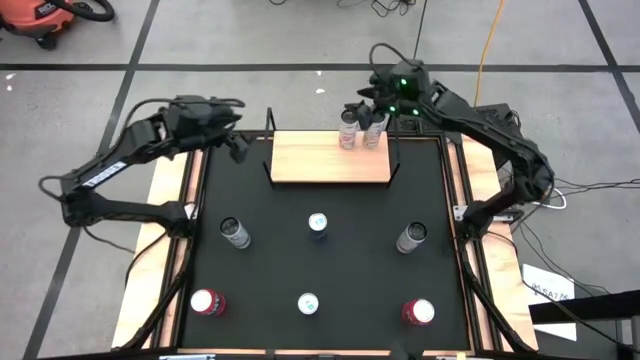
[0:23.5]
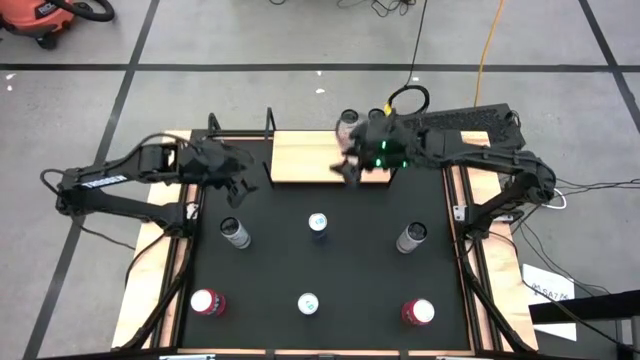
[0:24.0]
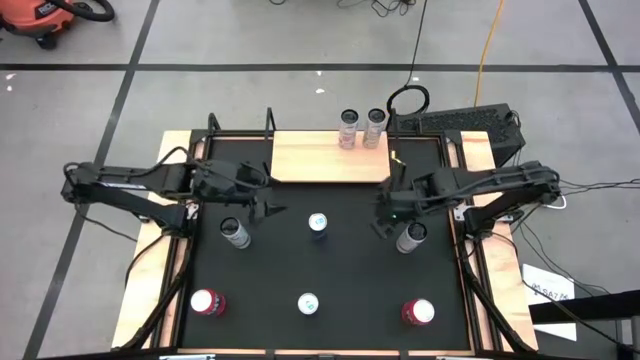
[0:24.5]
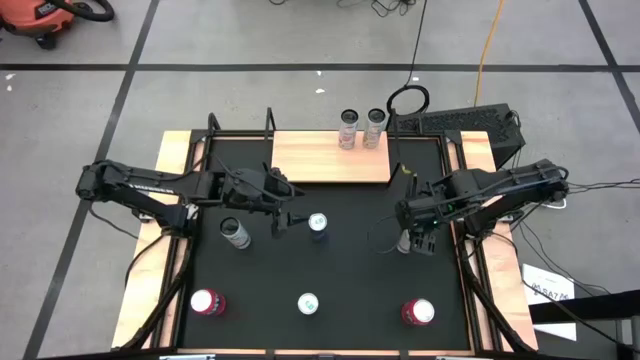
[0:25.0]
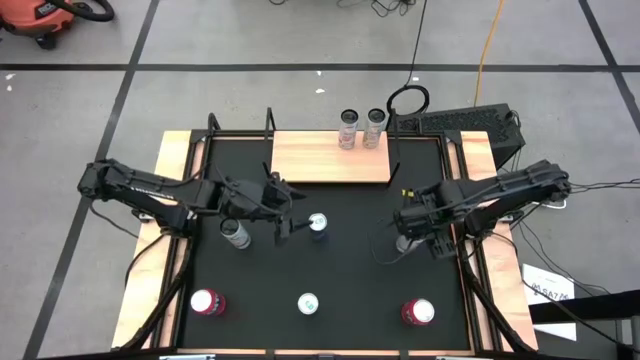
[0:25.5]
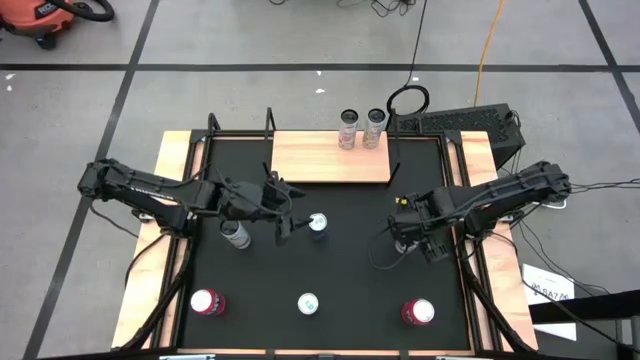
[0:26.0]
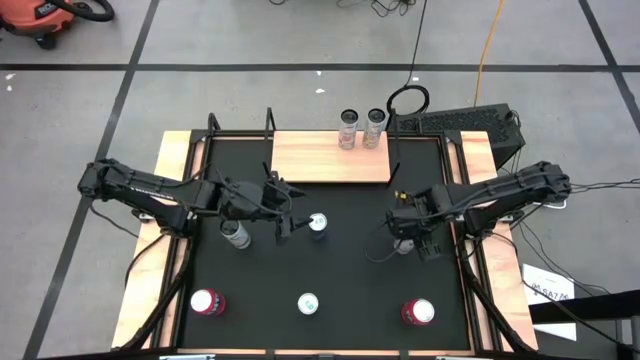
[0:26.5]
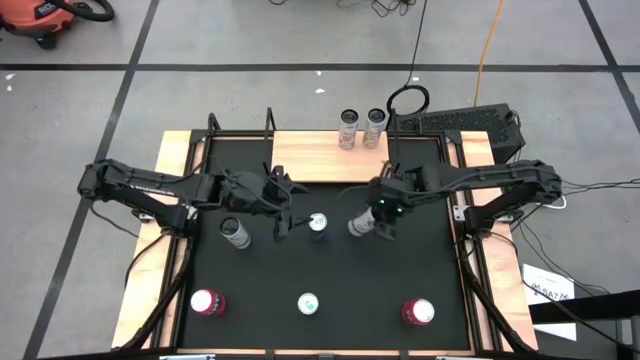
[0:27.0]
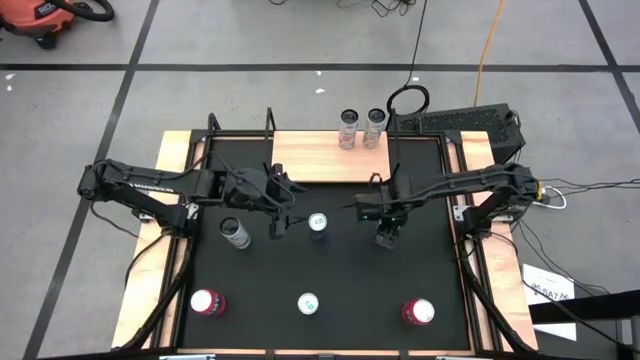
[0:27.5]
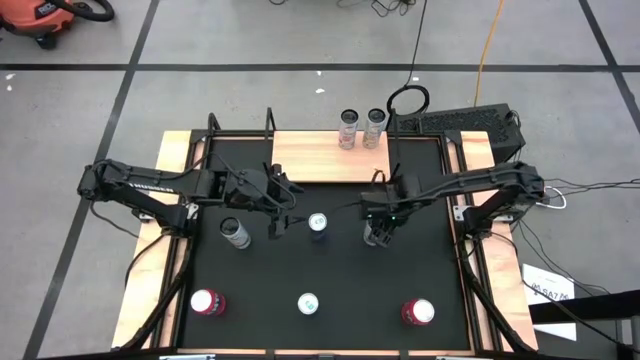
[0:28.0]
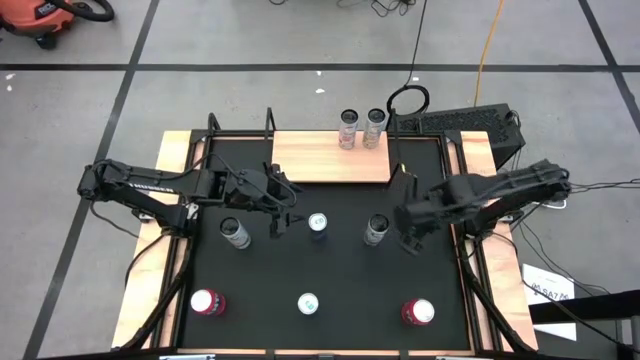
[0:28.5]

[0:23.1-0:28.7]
Task: Place canned beverage on shelf
Move the right white soda can to the center of the table

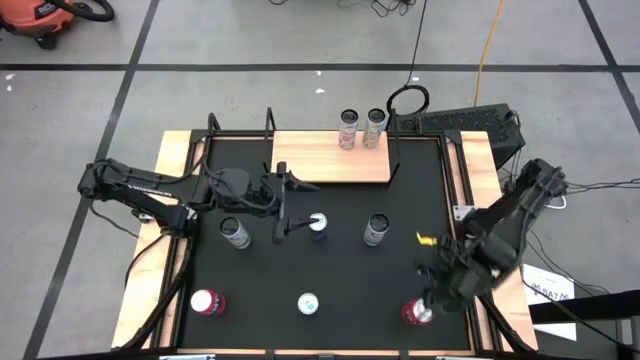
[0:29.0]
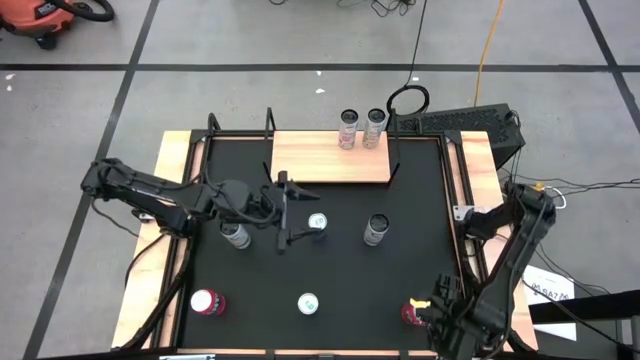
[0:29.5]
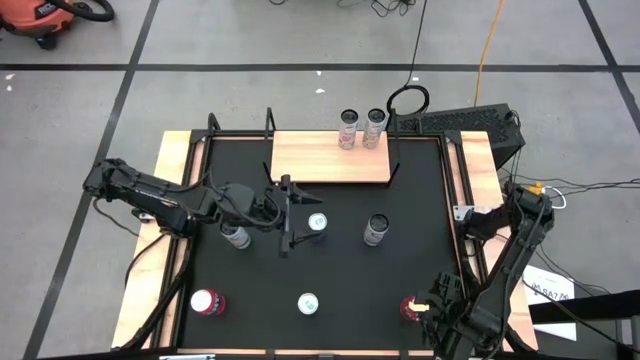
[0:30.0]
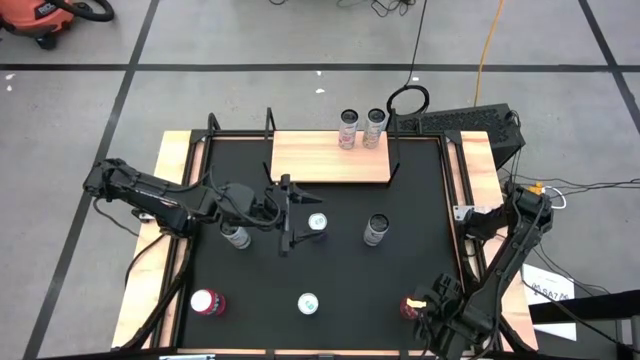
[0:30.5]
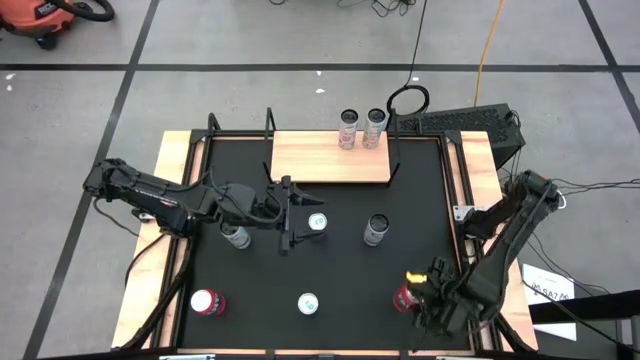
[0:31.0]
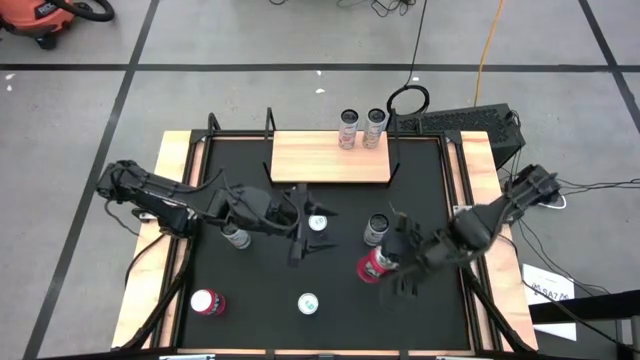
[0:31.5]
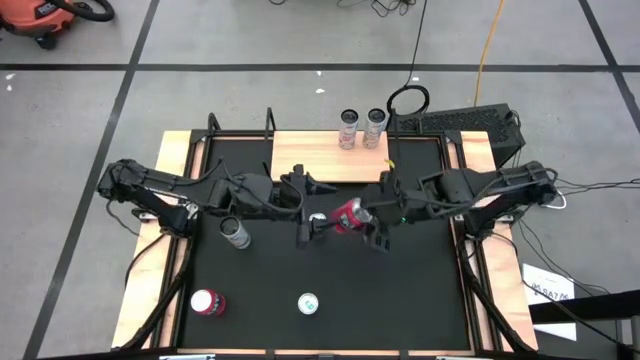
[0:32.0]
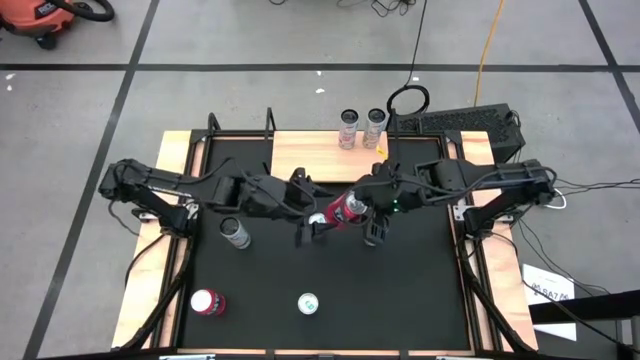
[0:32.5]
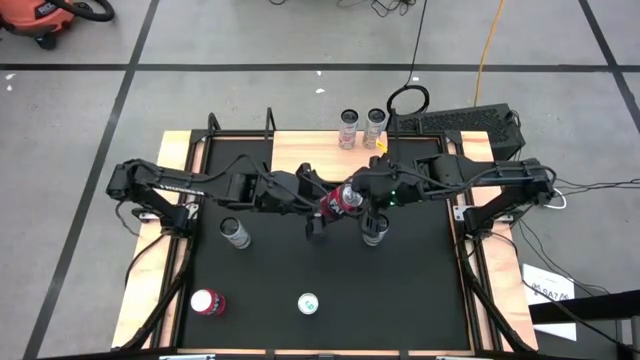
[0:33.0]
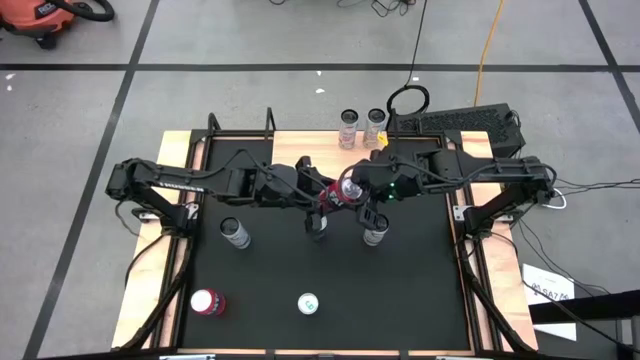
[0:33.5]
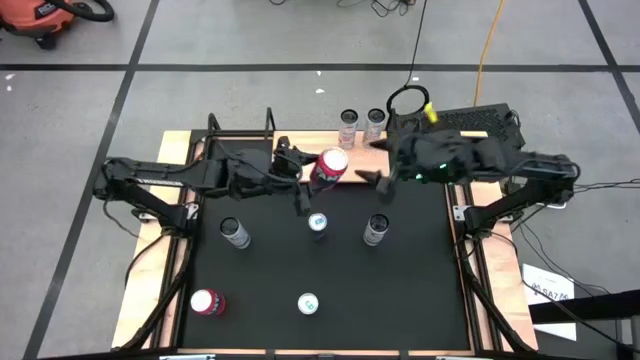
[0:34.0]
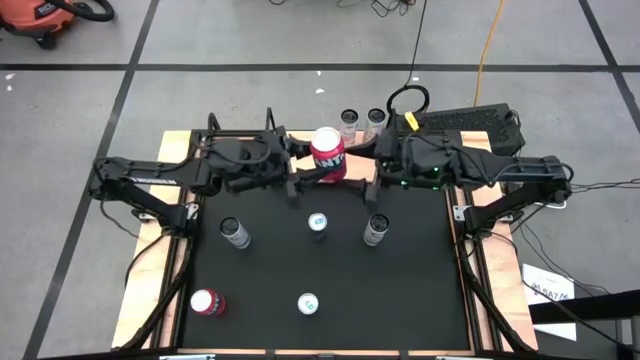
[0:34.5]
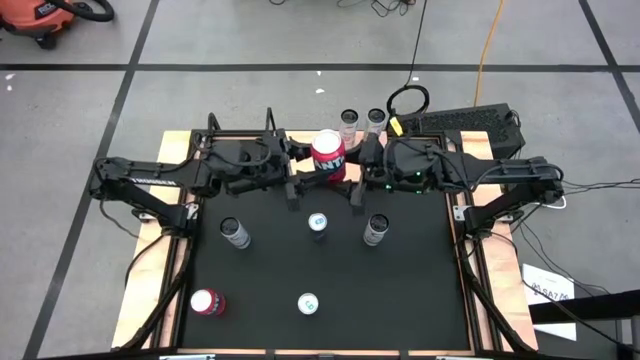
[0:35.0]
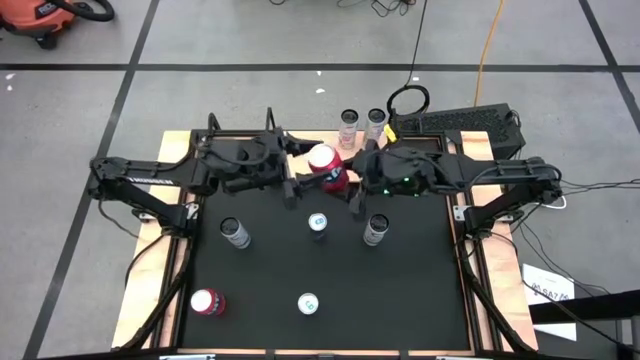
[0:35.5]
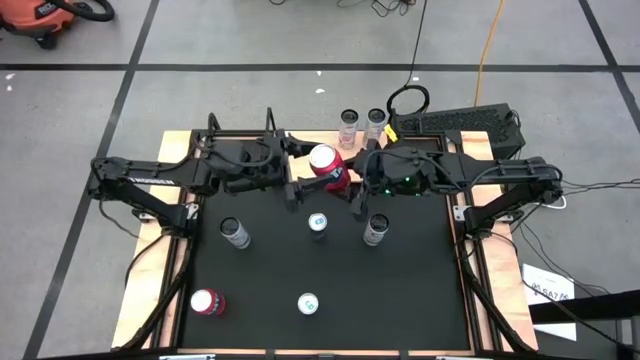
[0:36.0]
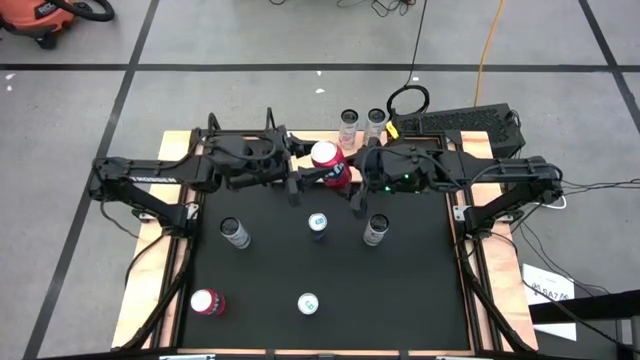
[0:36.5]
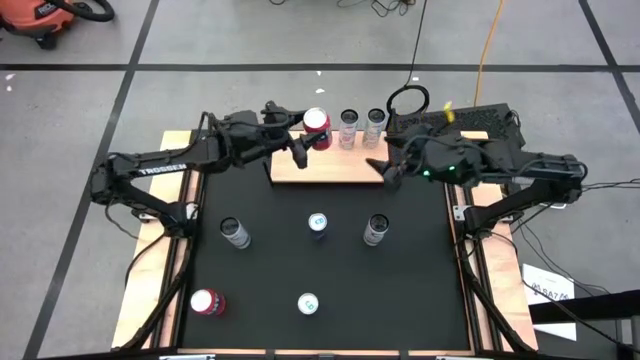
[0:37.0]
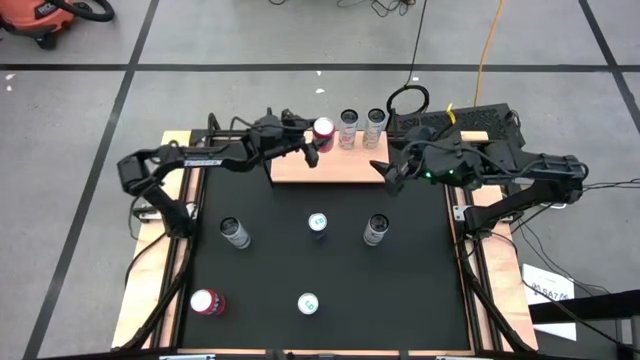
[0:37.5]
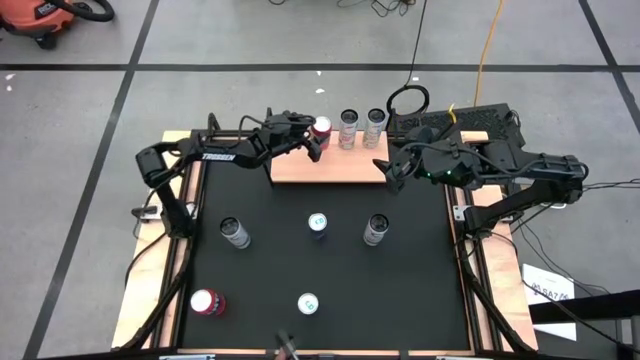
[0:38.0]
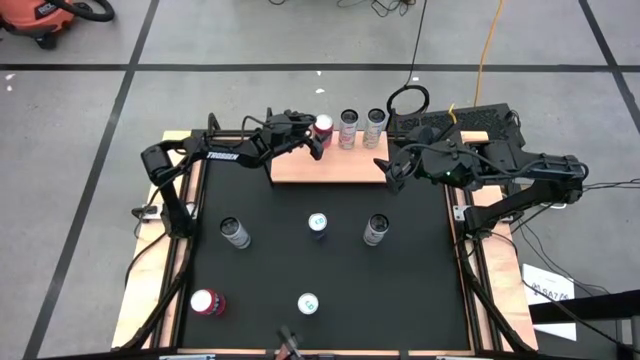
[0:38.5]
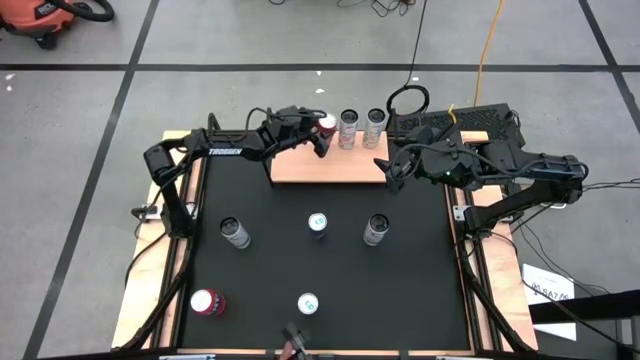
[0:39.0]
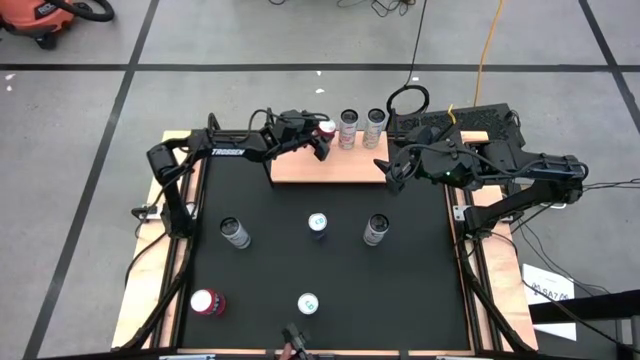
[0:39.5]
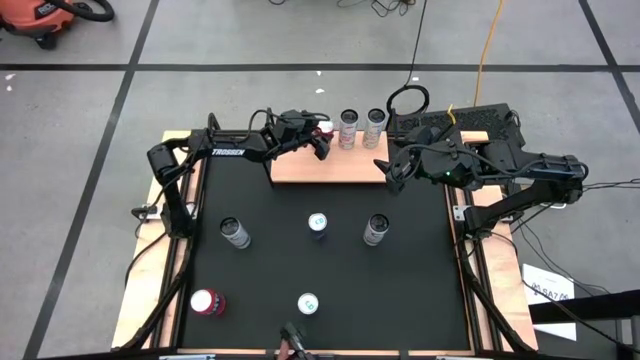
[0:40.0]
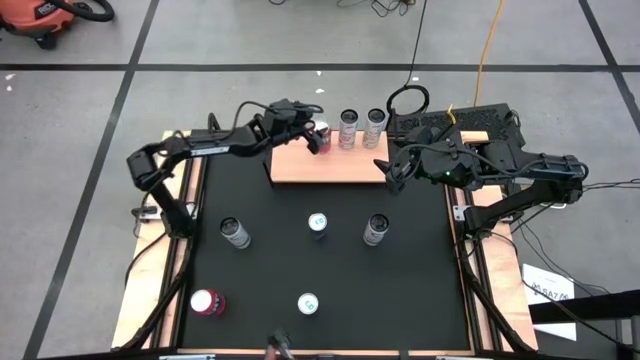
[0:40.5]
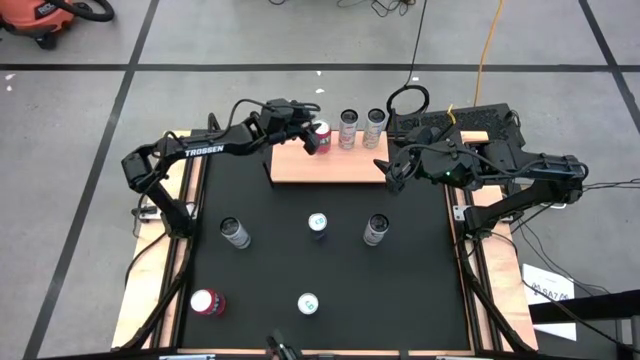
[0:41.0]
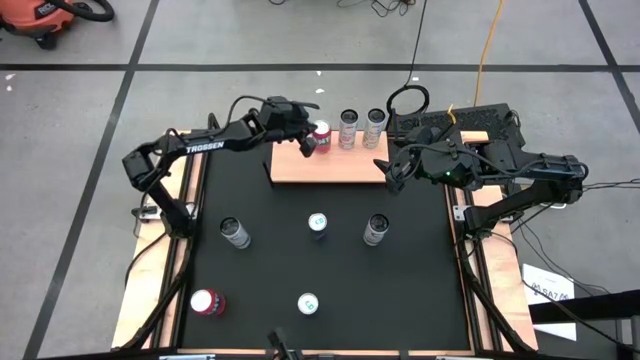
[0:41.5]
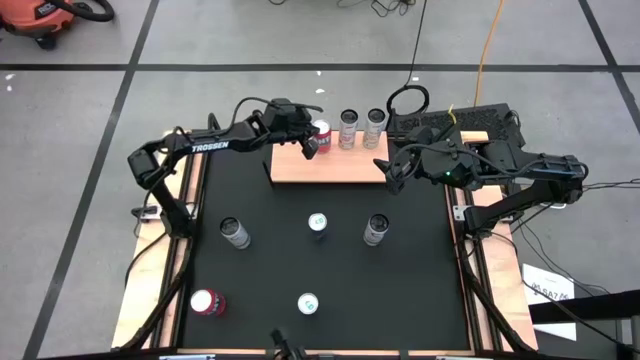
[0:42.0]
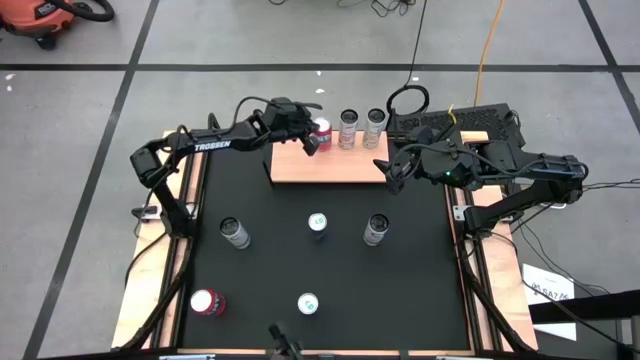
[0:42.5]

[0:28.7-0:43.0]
Put the right orange soda can on the shelf

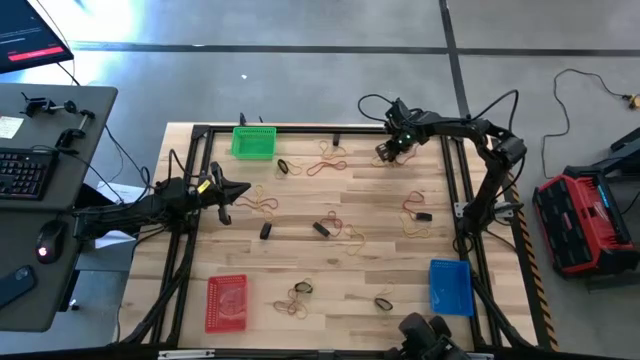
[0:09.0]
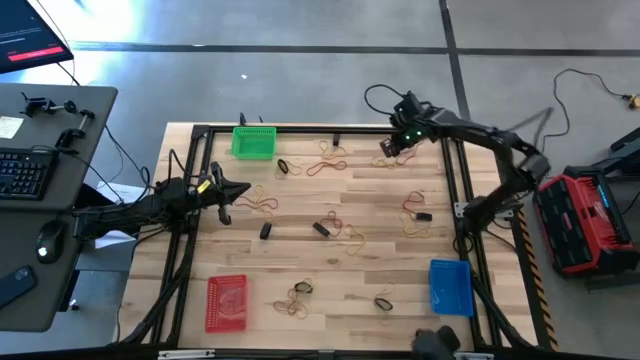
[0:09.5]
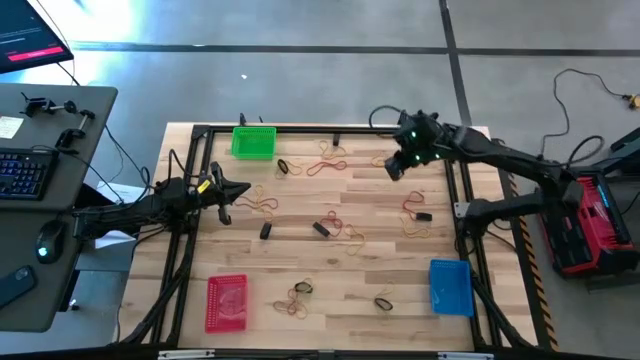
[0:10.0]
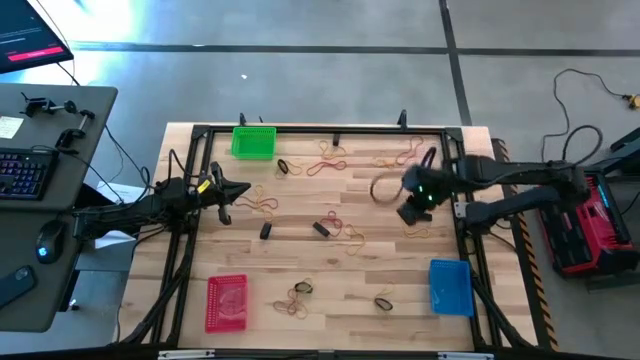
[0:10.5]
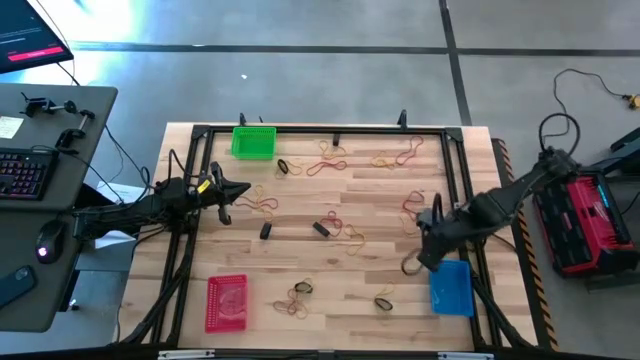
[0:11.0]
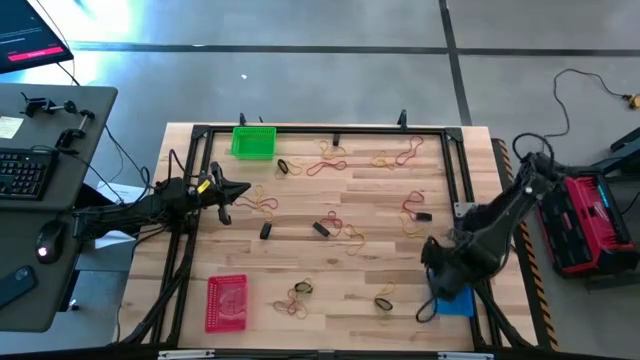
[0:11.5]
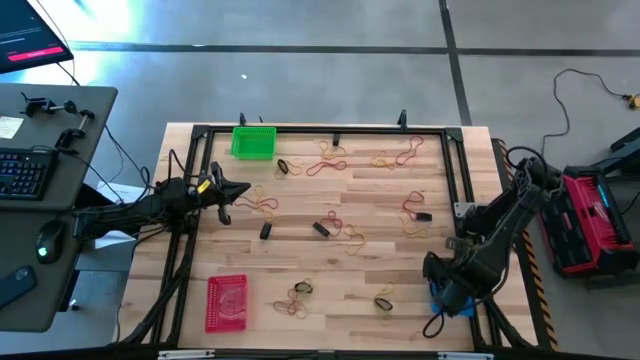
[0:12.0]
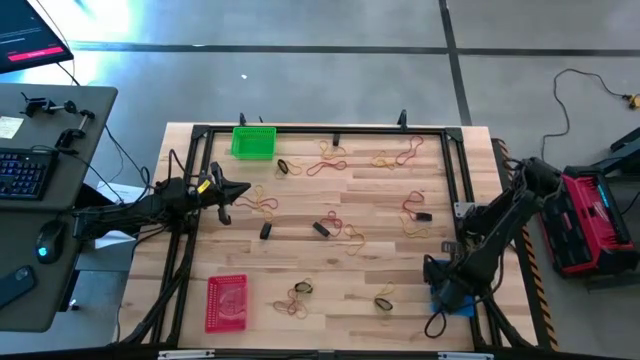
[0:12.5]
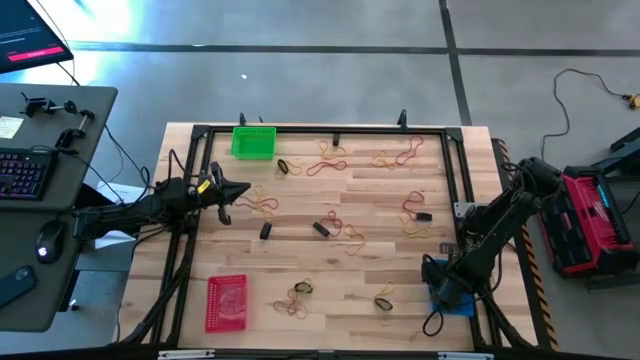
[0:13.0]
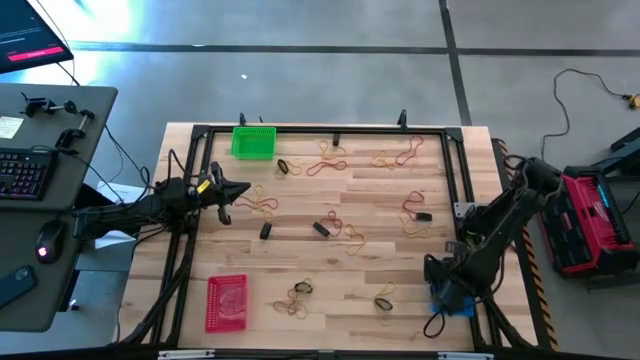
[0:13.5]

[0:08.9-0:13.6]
Task: Sort rubber bands into baskets
Put the black rubber band into the blue bin
